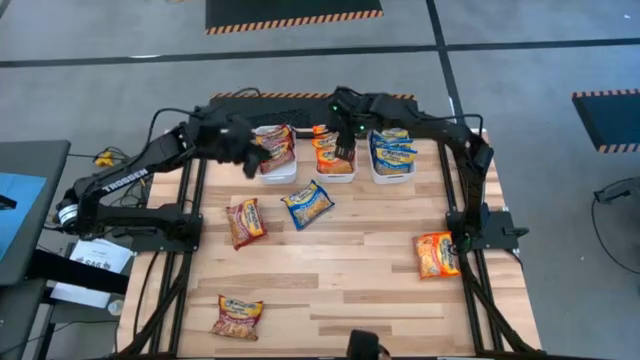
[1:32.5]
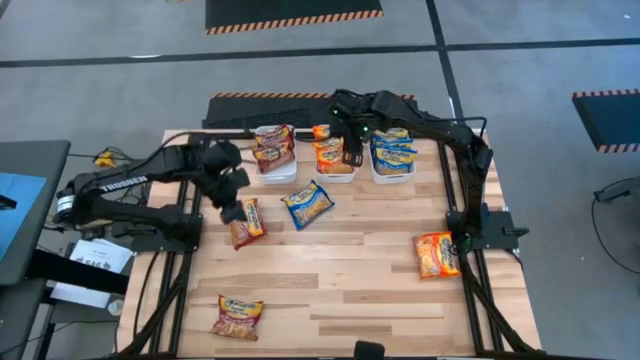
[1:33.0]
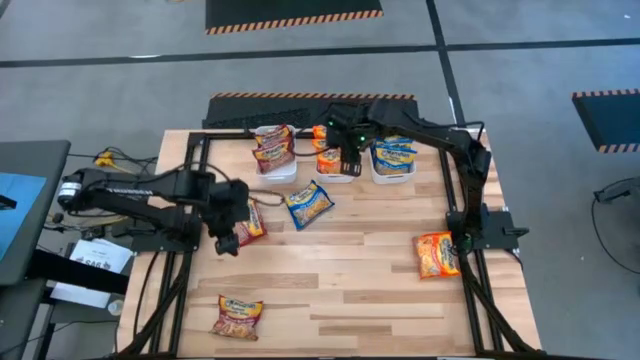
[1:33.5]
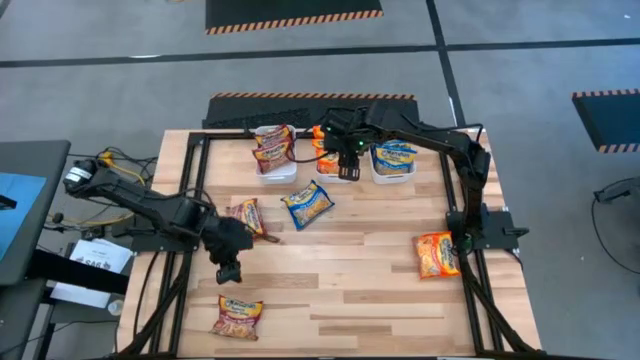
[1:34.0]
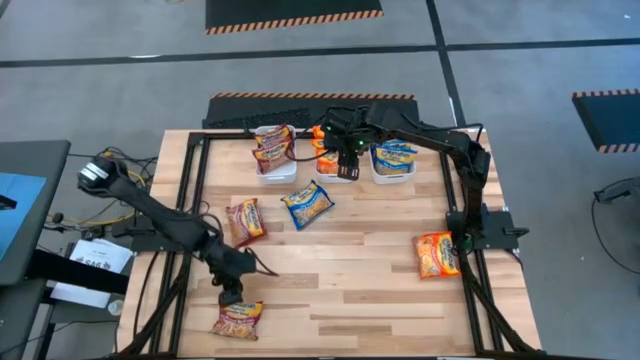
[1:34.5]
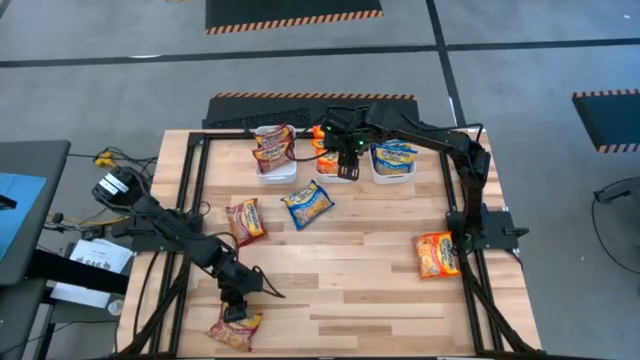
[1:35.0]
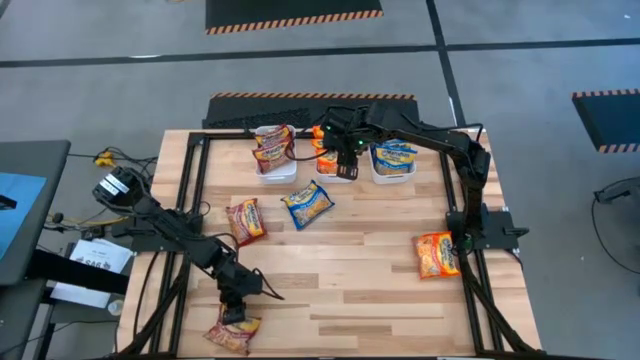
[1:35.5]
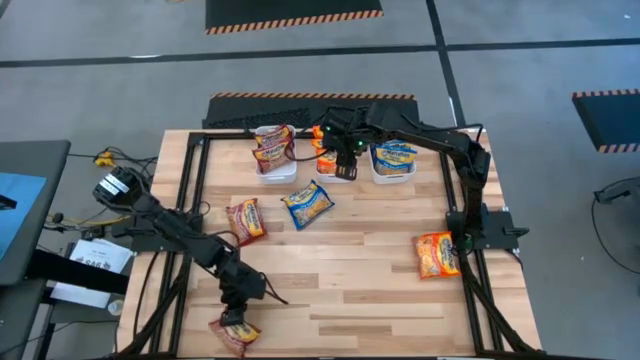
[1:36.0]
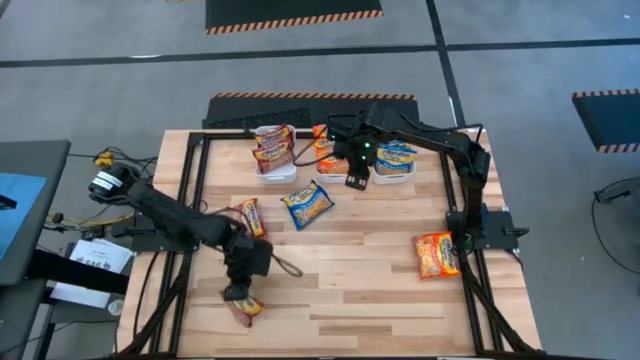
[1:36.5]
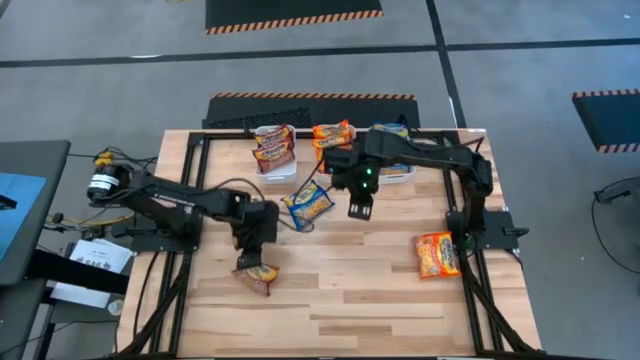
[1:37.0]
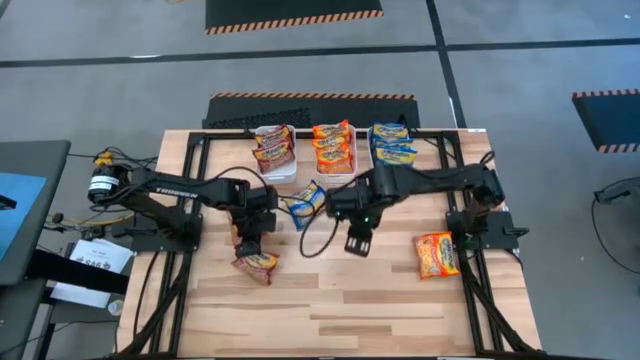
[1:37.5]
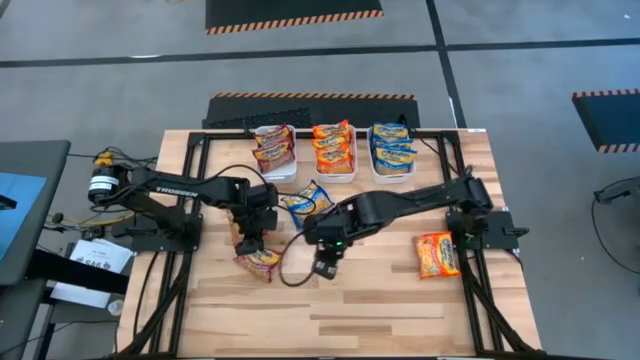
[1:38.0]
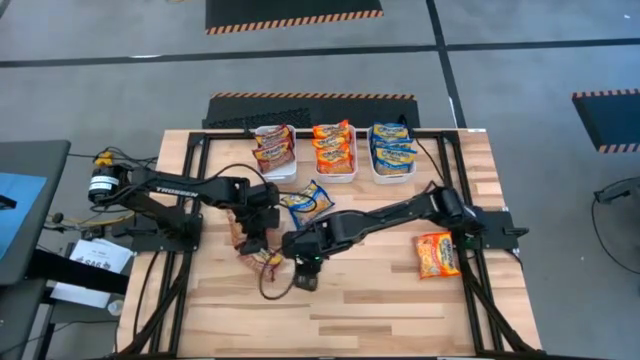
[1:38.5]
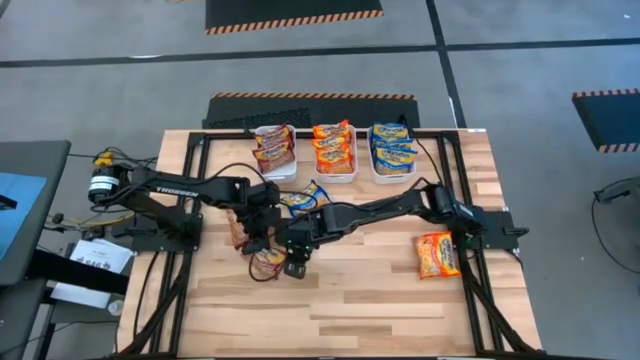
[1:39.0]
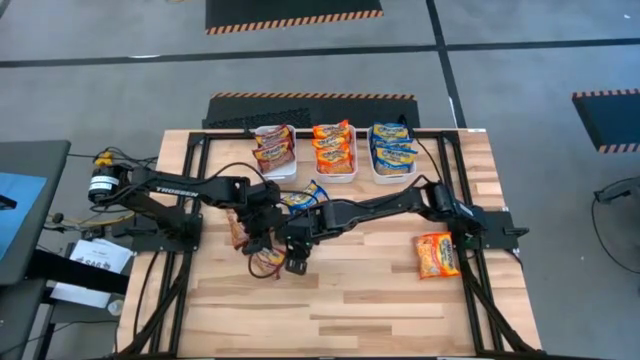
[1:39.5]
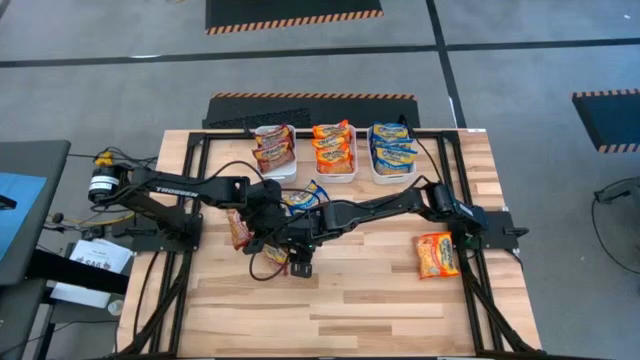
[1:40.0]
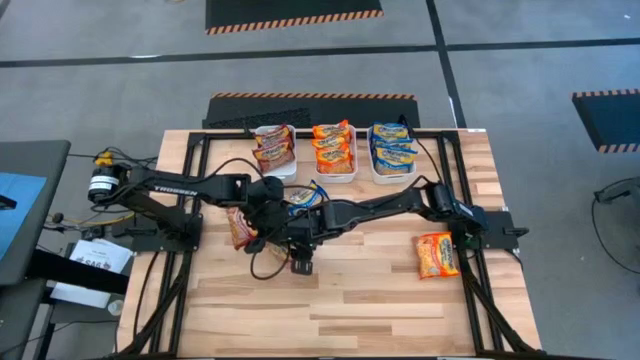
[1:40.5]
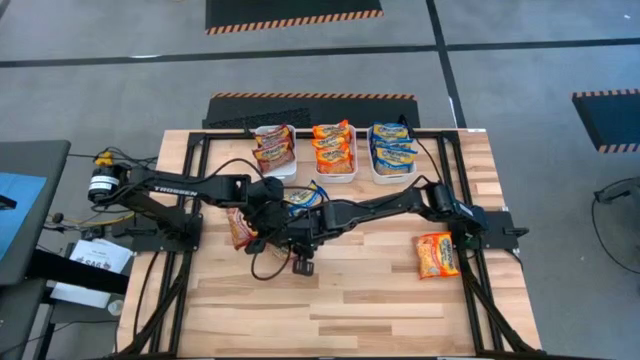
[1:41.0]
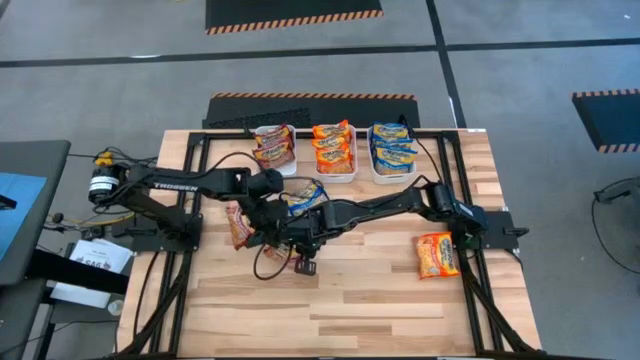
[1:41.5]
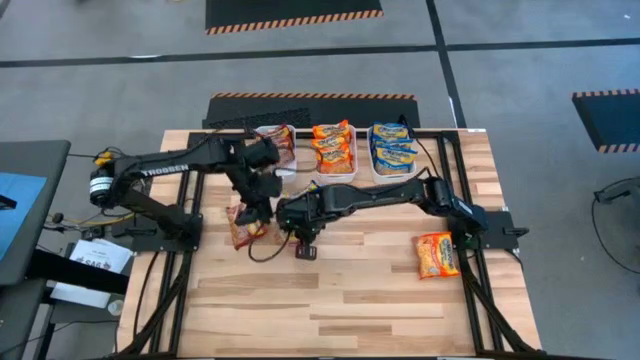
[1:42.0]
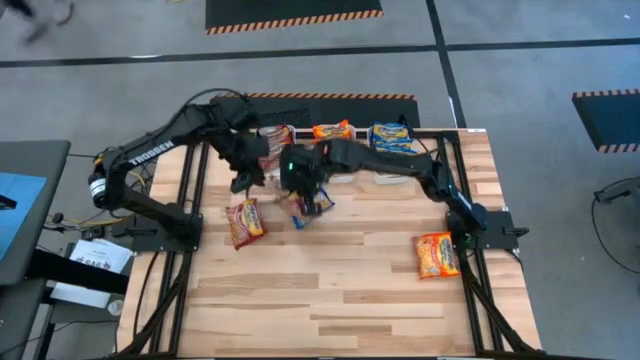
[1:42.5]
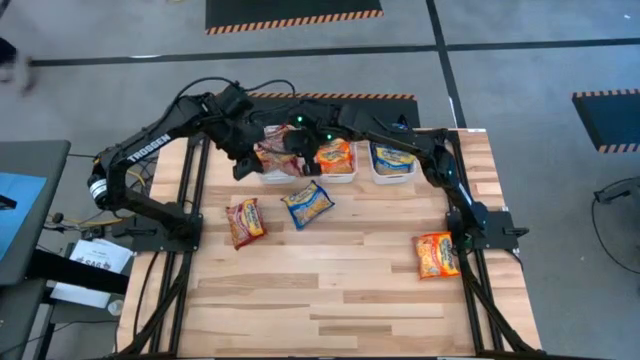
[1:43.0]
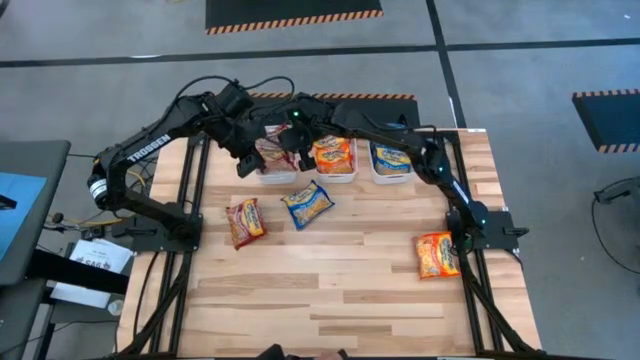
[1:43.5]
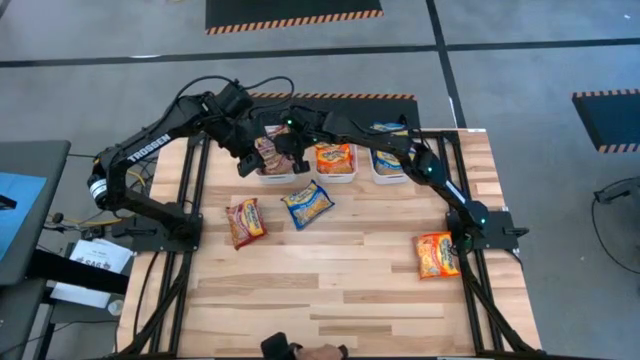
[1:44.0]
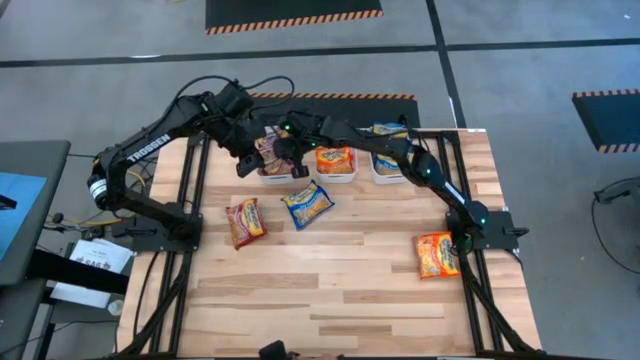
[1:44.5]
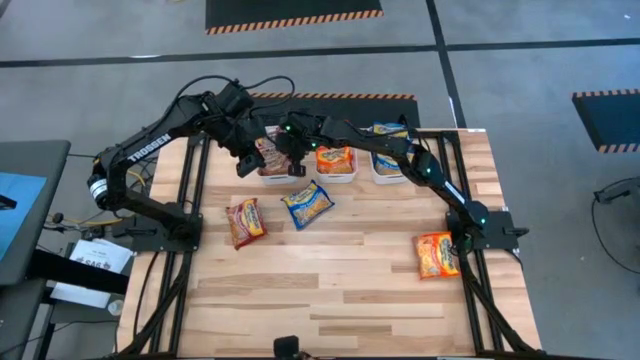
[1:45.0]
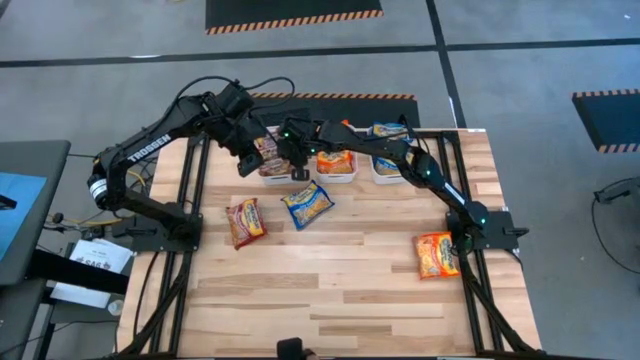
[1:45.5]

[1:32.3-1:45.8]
Task: Sort Maruchan noodles
Put the red noodle pack into the left white bin

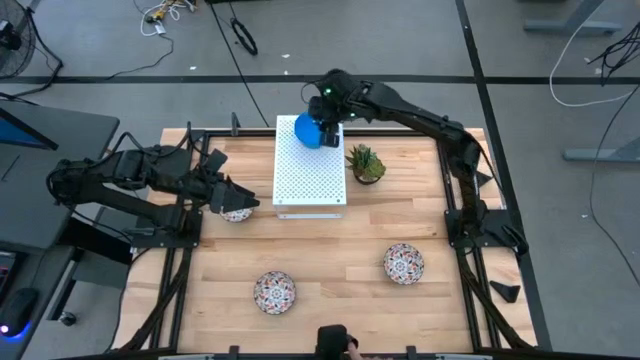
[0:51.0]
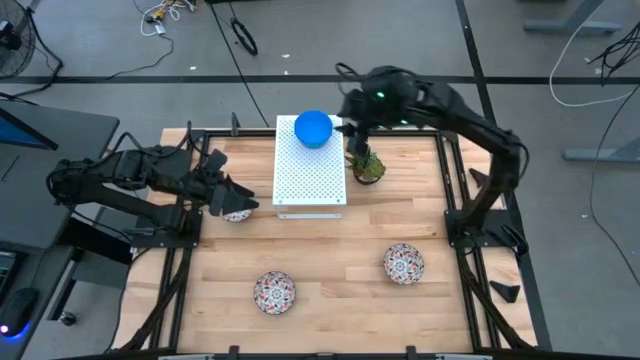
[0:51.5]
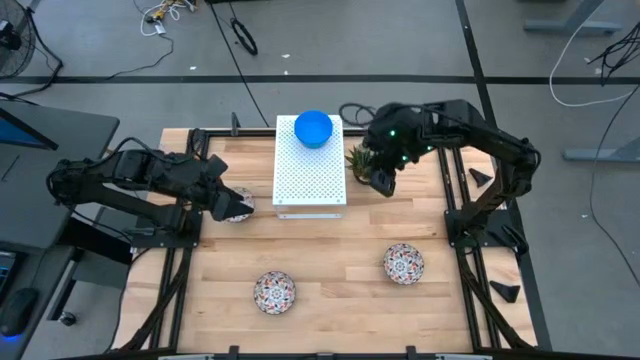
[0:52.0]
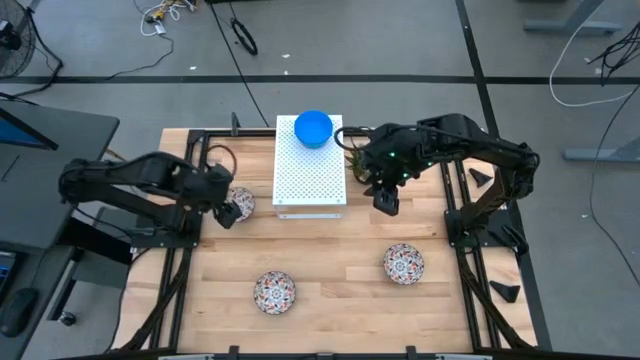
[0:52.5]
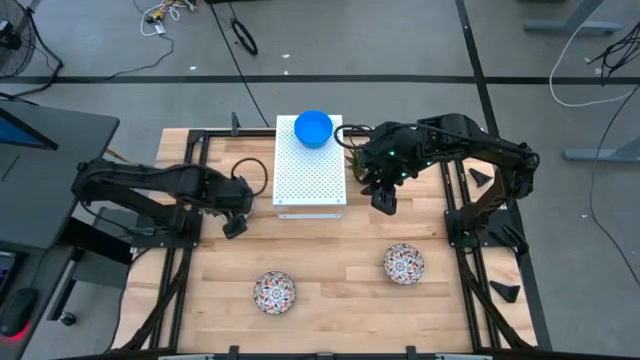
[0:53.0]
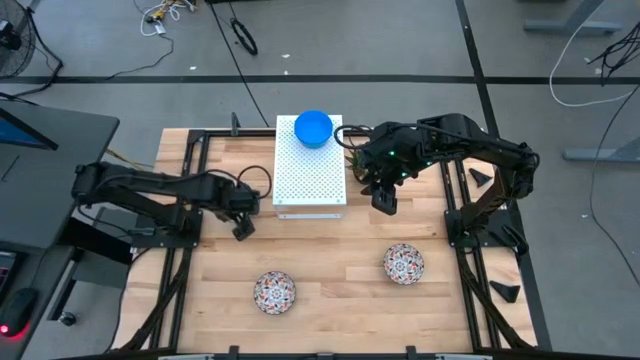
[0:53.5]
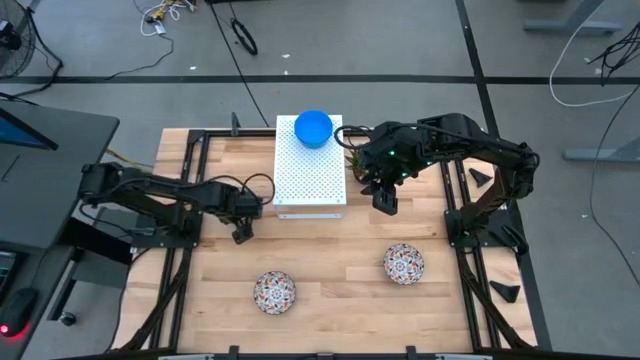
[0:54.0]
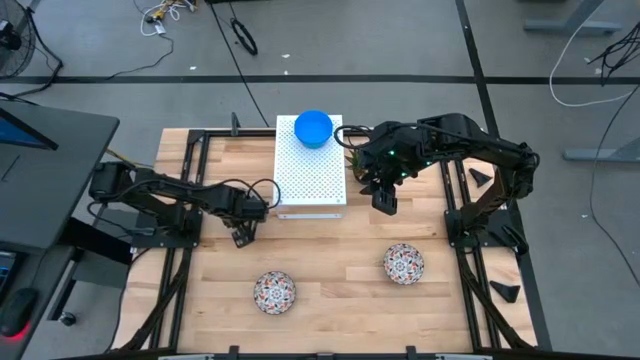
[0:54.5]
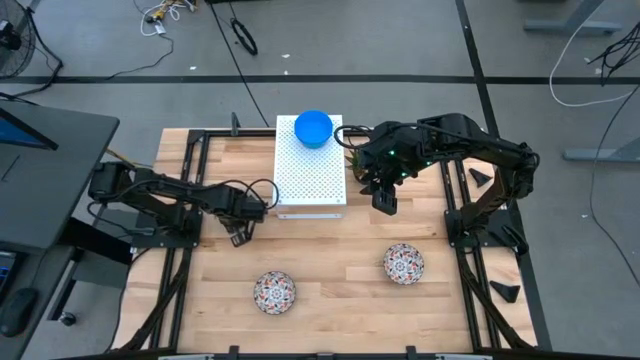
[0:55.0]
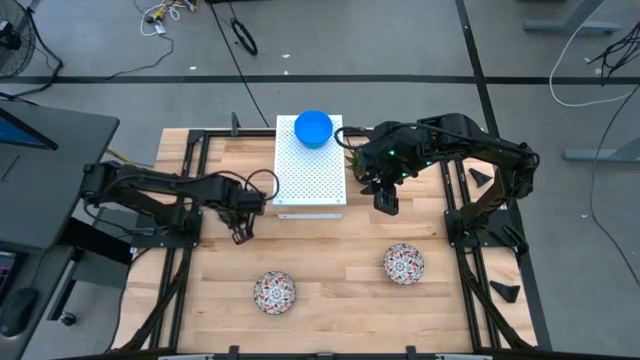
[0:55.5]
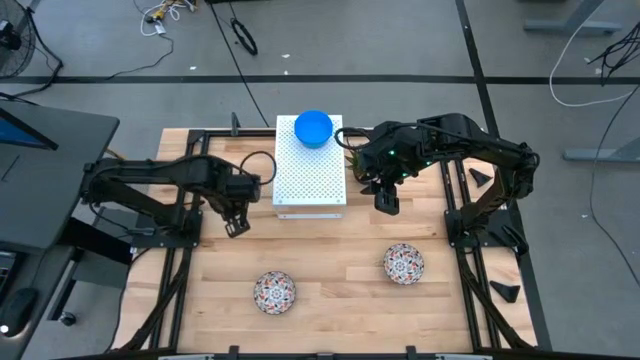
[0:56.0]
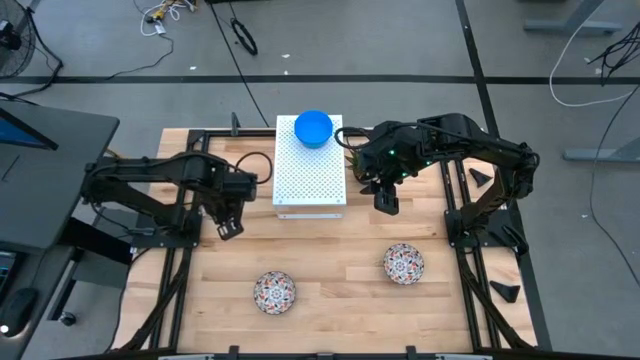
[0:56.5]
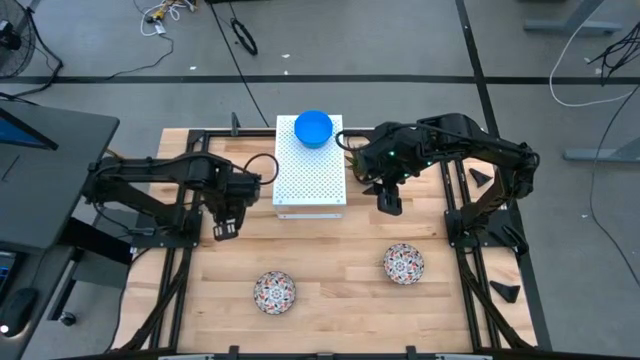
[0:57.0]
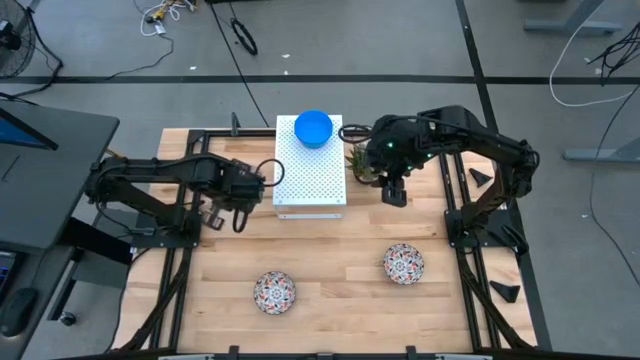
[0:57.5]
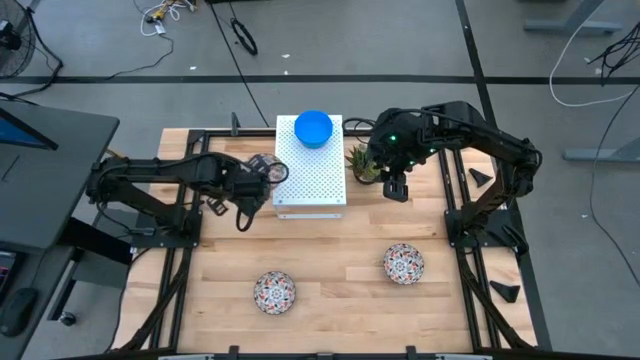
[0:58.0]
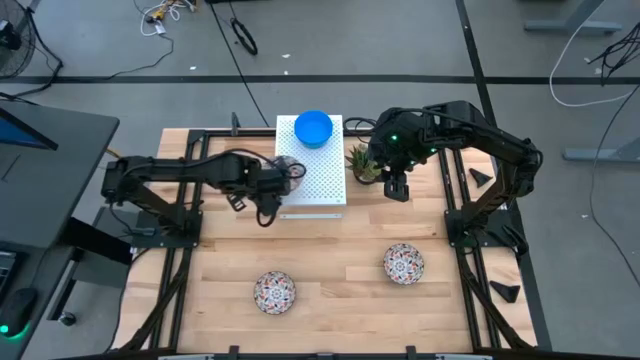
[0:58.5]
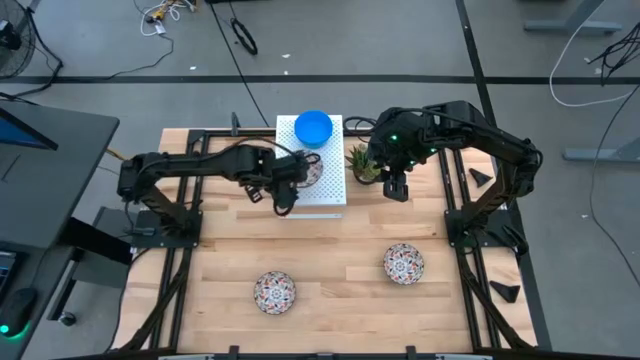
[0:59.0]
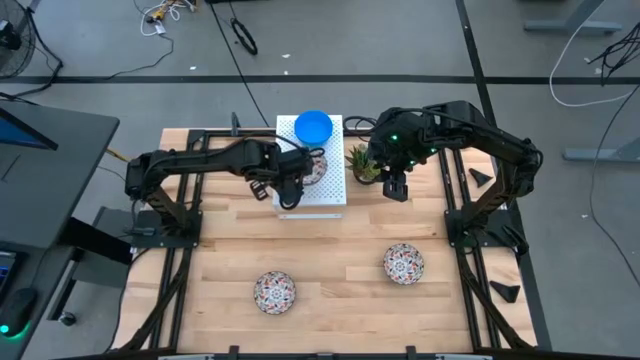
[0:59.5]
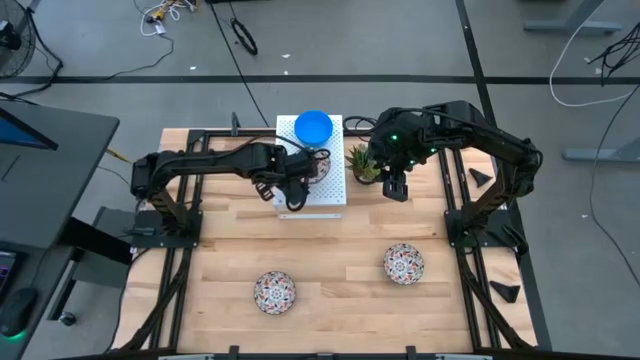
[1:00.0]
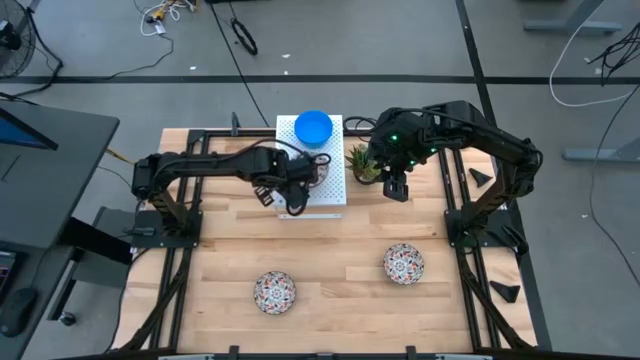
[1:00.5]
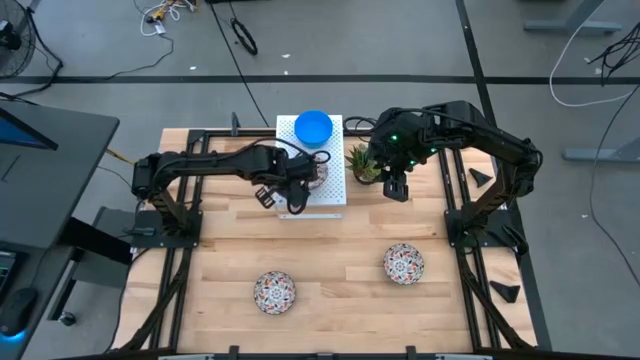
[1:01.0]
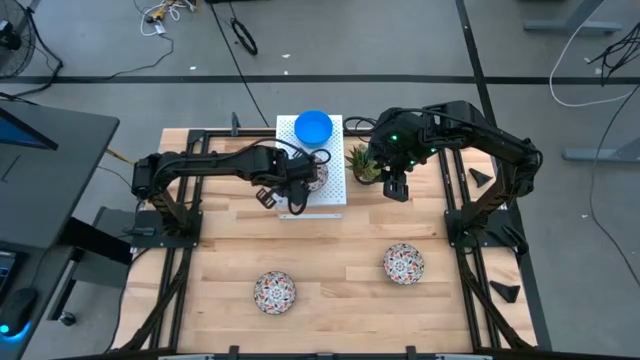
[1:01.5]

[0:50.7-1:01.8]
Task: Pick & Place Mini bowls
Put the top white patterned bowl on the shelf
